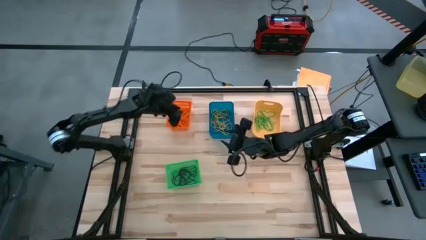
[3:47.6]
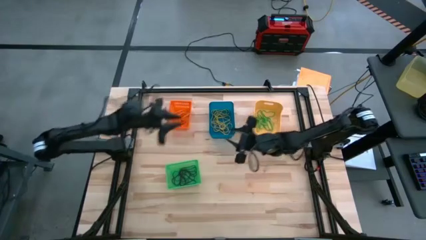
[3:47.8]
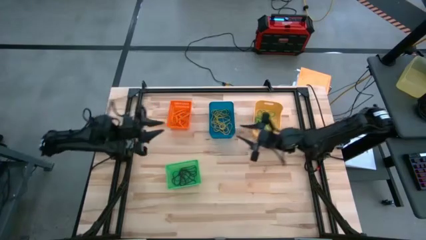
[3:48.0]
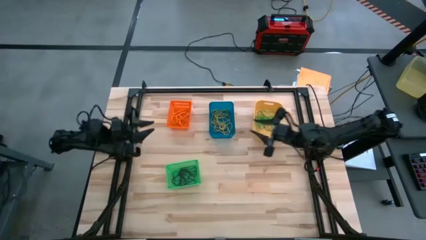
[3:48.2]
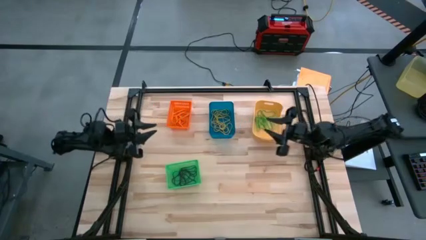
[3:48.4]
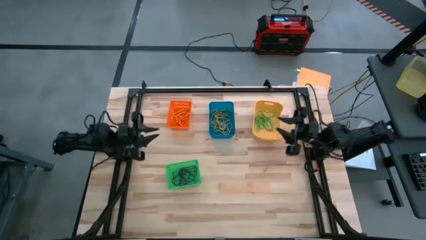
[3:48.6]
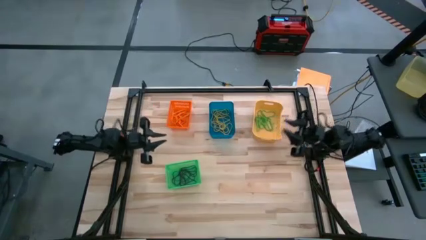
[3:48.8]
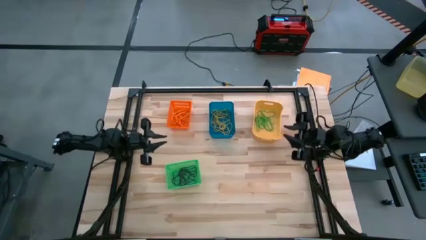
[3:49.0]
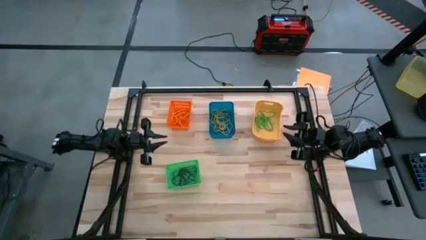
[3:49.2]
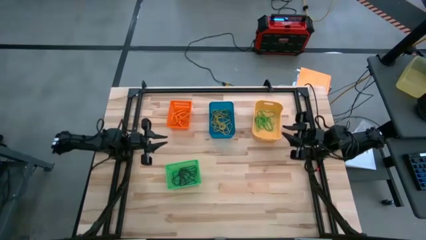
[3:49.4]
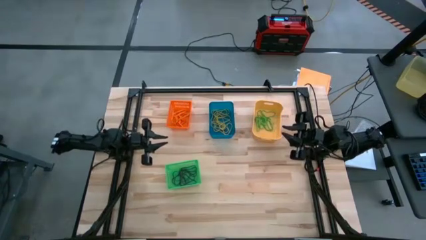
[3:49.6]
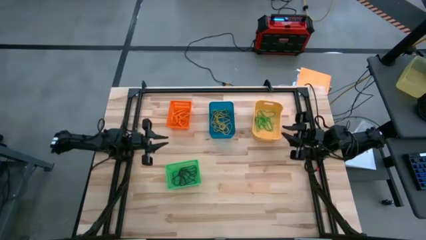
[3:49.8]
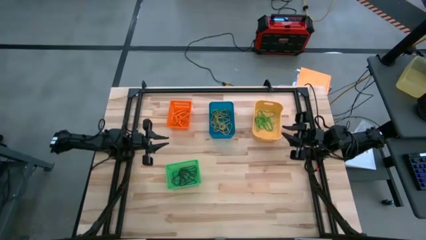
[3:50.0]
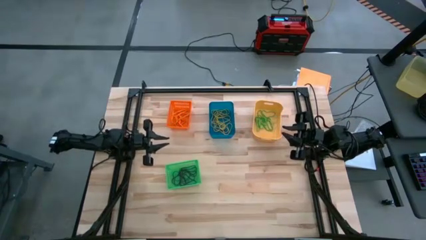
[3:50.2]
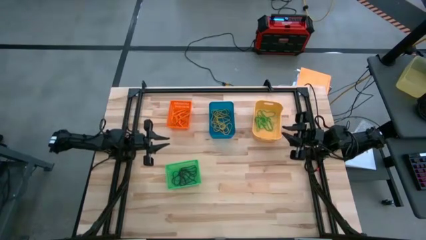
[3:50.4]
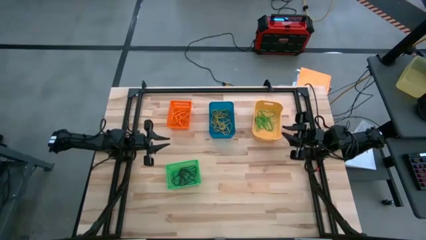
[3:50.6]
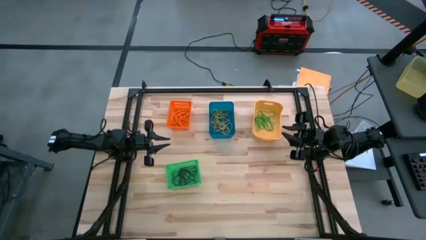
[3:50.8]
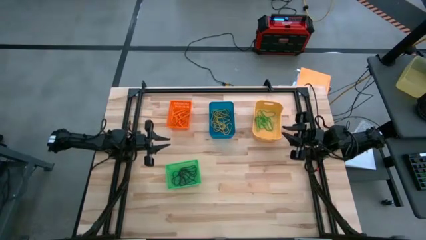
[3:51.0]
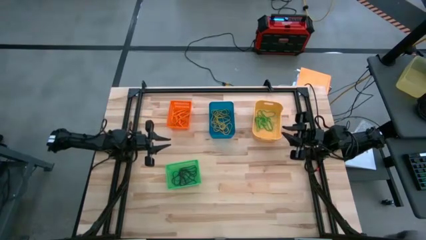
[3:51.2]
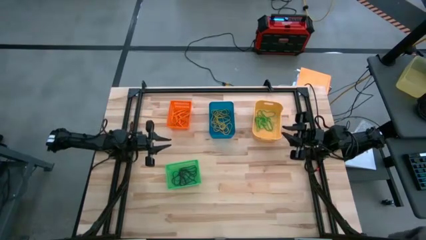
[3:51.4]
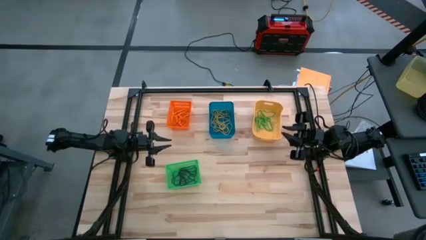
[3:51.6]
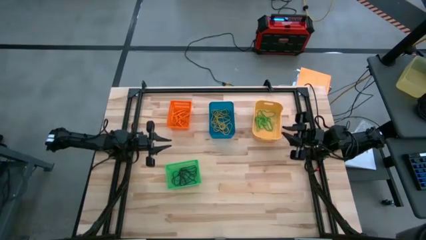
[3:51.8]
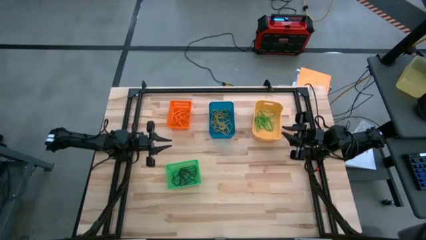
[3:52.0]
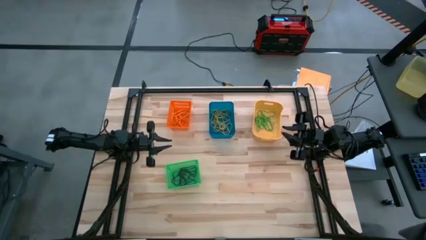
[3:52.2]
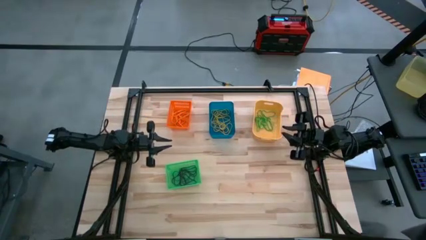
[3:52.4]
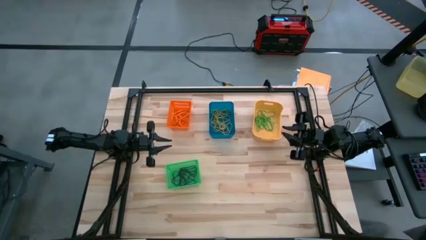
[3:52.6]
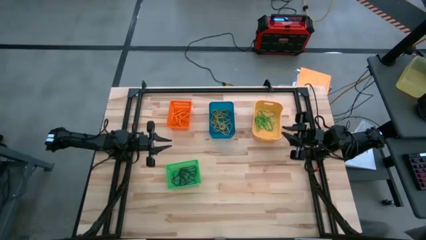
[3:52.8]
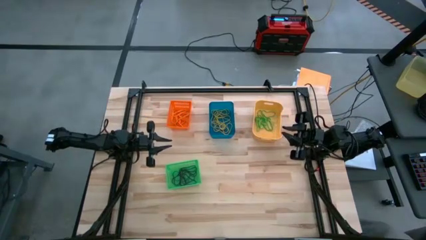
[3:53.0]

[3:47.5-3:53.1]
Task: Sort rubber bands into baskets
Return to Home Position

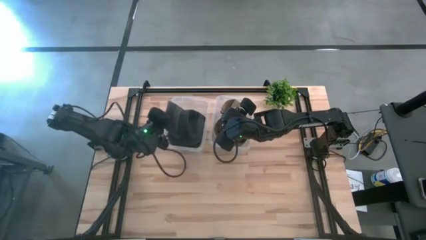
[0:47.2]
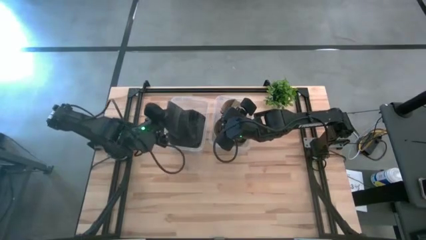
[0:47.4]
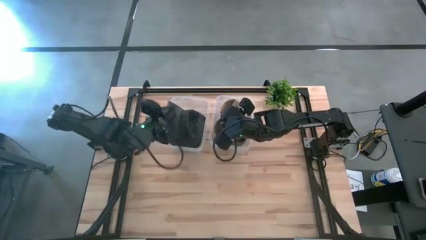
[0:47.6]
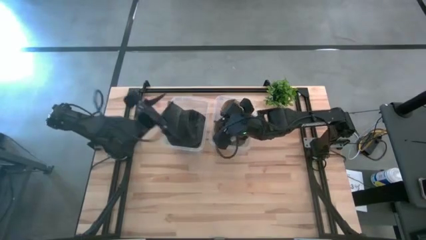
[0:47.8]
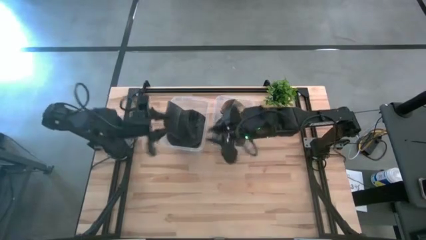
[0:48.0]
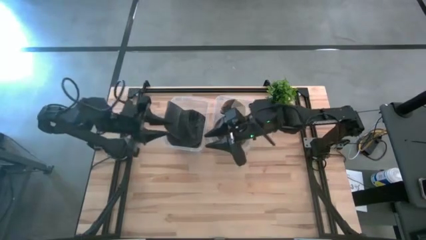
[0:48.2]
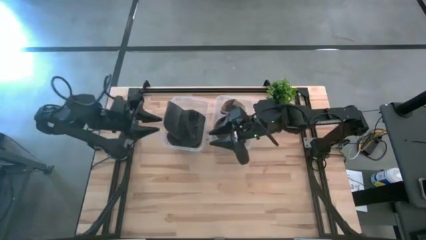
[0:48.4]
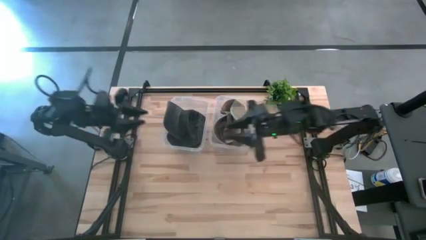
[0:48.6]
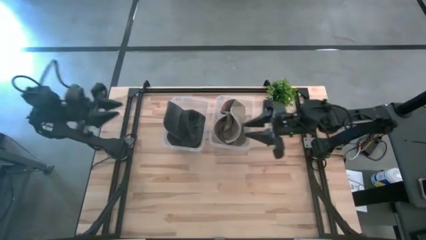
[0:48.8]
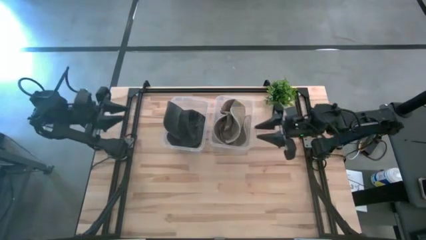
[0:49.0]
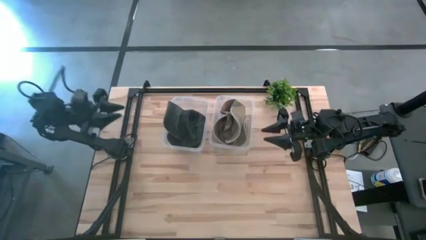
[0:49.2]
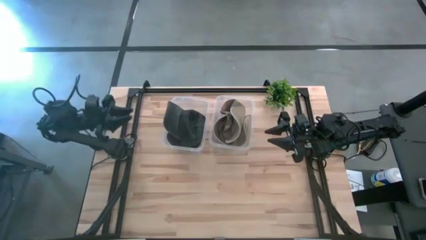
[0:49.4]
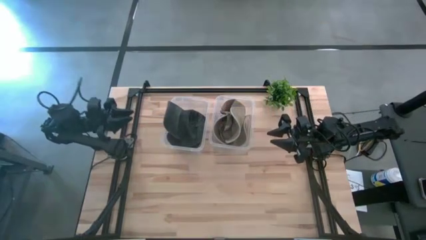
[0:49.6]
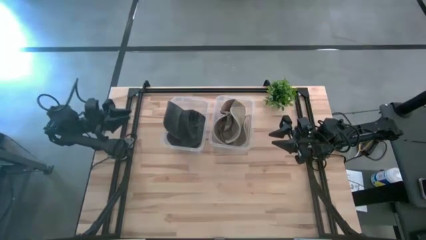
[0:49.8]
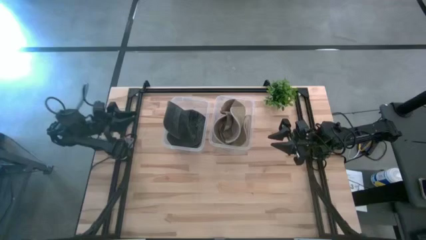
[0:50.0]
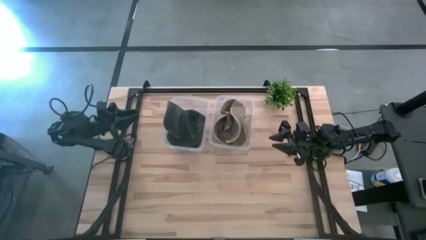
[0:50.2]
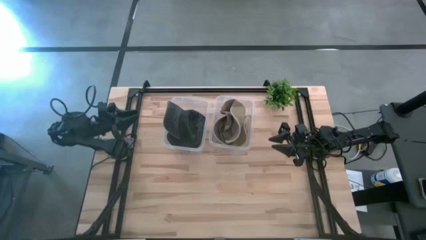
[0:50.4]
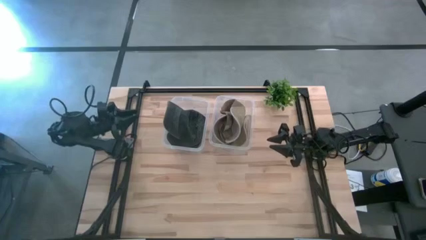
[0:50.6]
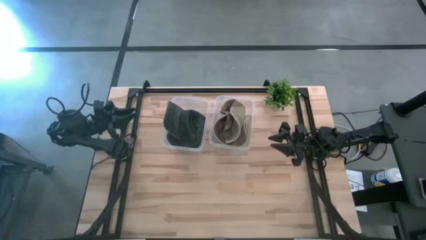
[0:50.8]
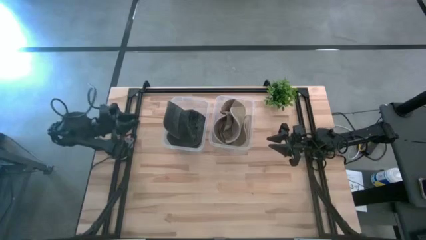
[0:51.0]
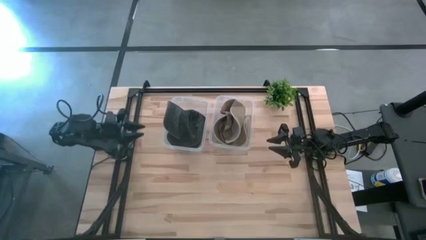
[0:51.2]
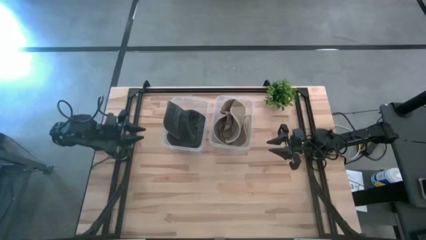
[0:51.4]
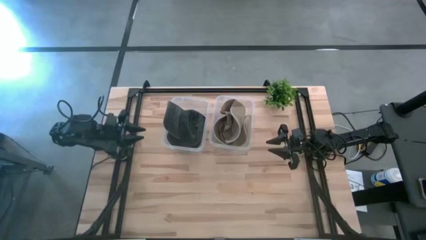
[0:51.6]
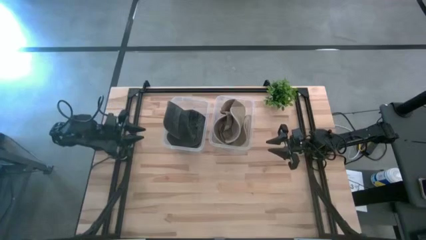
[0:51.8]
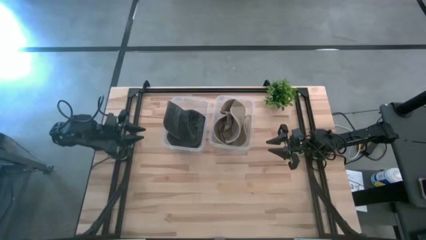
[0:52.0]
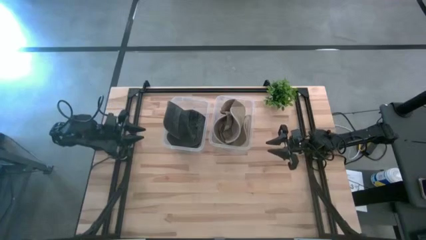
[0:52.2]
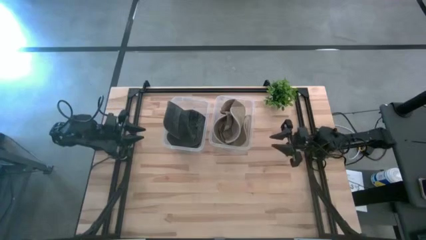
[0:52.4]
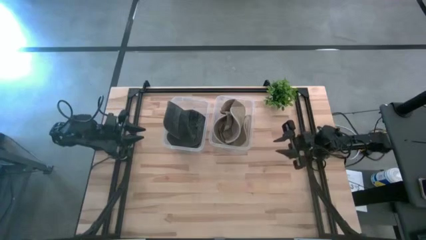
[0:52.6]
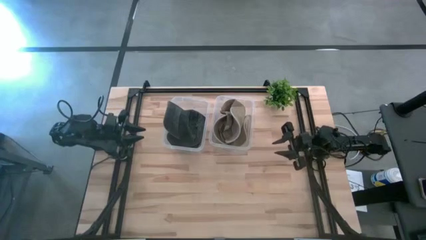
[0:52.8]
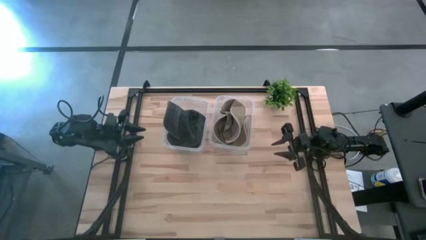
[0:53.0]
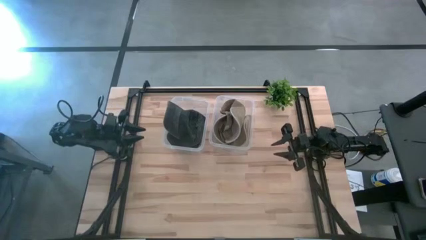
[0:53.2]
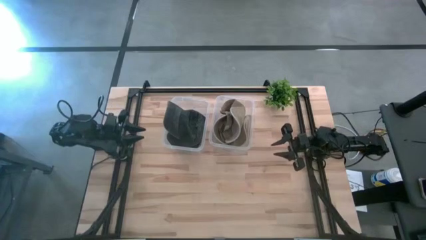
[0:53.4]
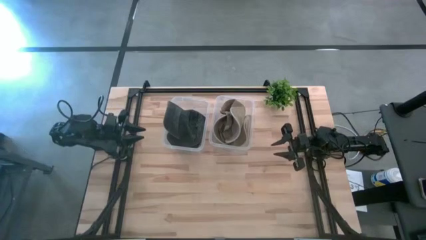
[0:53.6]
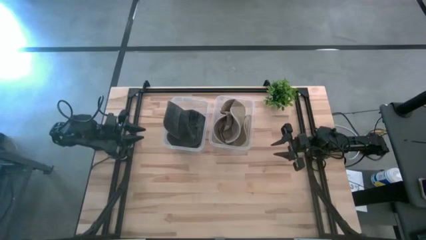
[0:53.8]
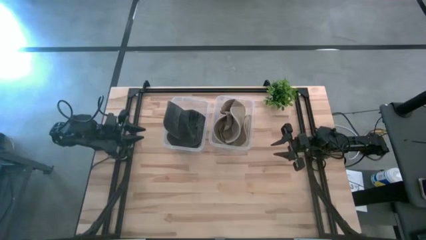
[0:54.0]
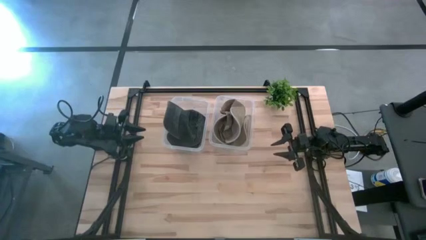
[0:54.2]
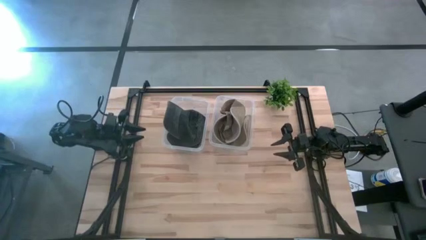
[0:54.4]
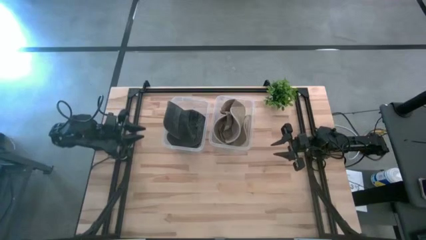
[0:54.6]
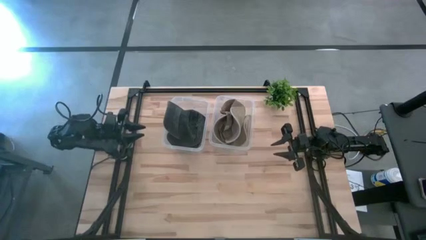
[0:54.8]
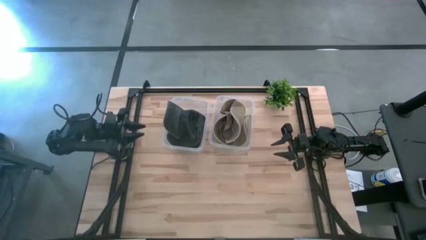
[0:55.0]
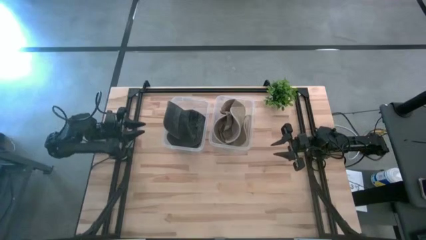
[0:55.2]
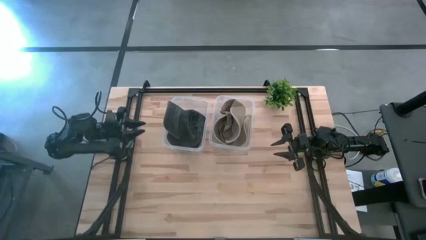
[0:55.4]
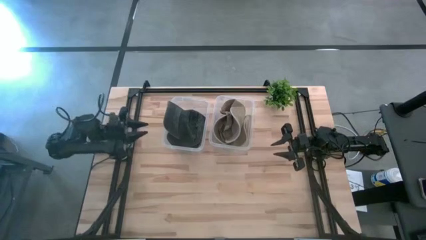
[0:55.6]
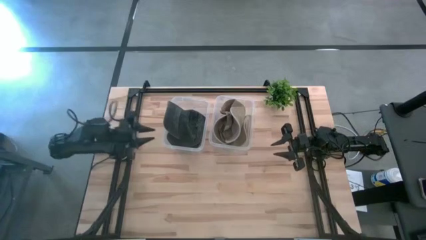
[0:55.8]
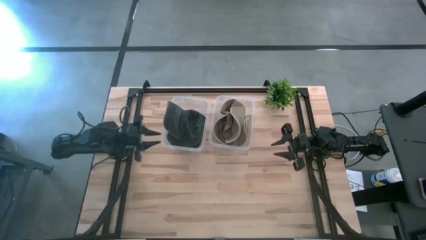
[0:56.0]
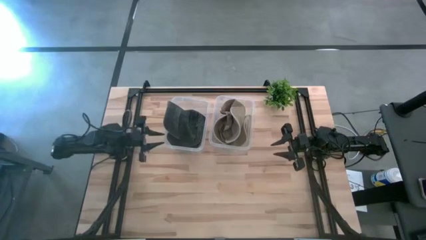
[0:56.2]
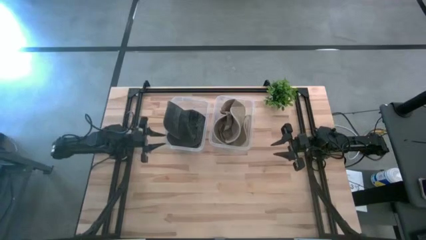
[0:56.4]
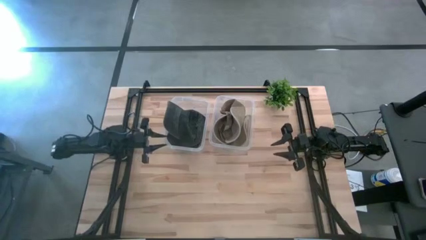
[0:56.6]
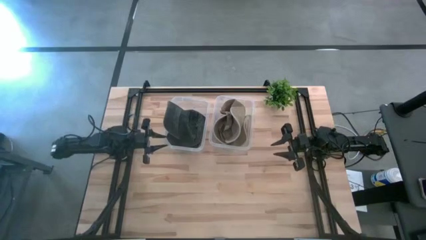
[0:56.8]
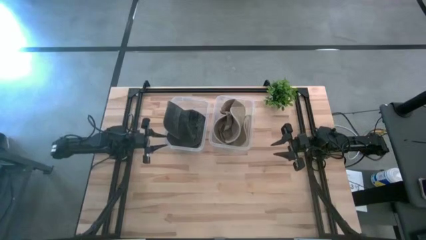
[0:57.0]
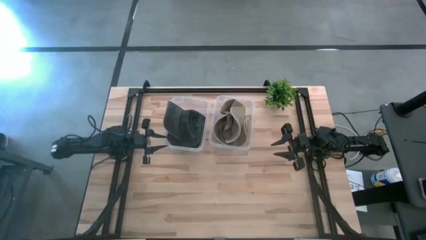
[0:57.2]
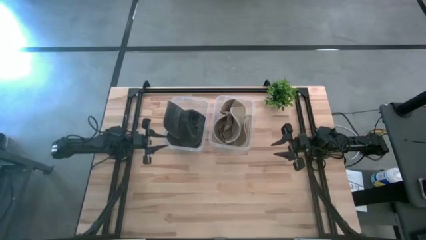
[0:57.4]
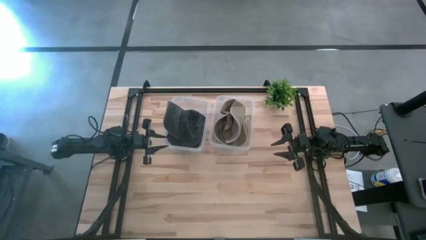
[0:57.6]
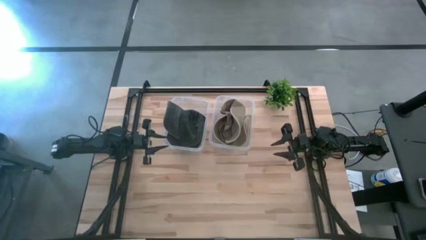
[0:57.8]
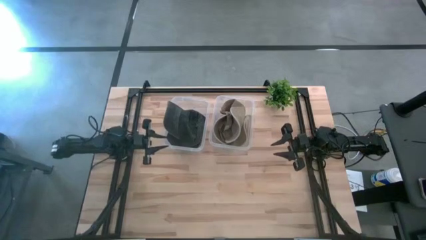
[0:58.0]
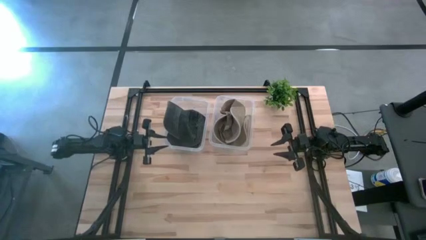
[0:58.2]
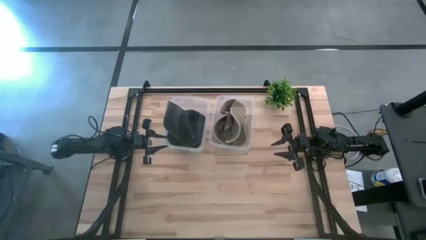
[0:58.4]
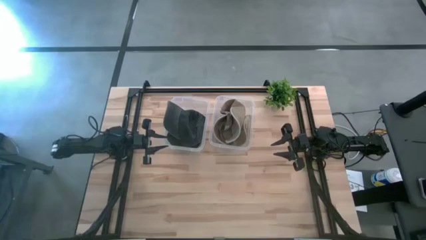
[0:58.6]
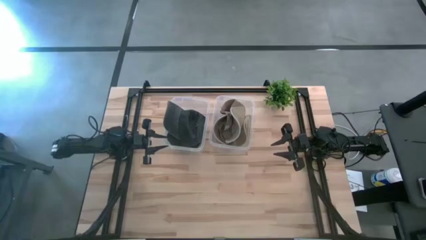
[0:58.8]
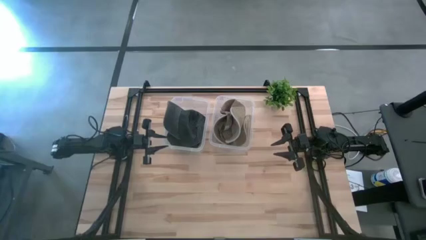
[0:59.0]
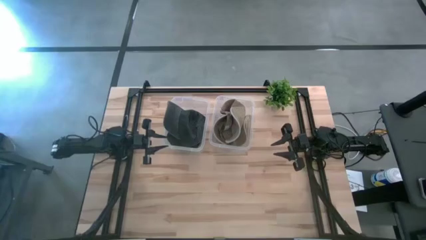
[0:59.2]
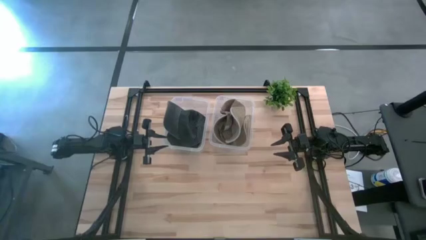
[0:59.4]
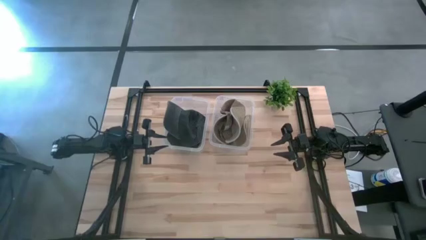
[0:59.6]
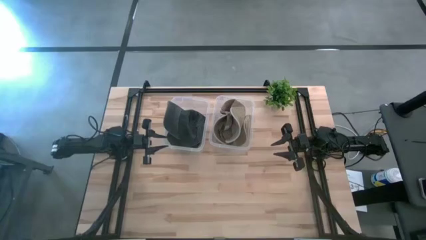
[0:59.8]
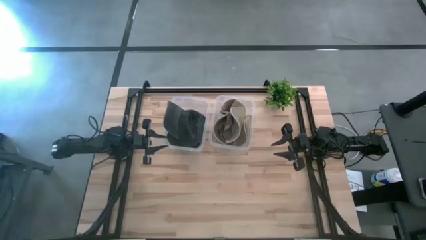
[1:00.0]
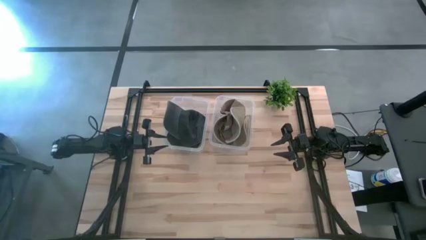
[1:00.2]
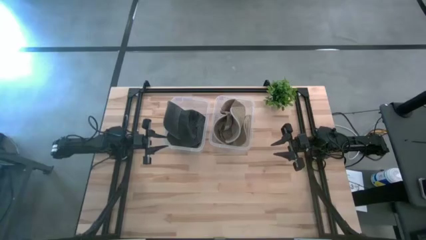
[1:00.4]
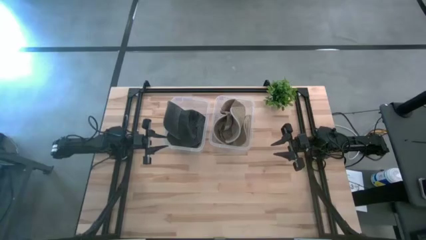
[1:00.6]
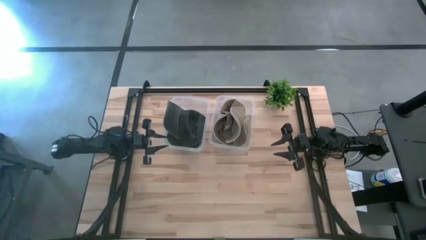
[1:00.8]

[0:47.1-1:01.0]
Task: Pick & Place hat
Return to Home Position
